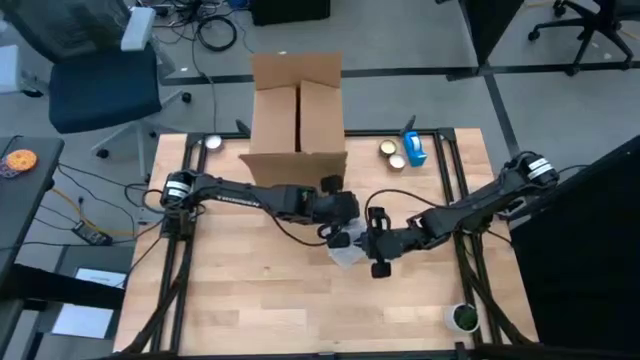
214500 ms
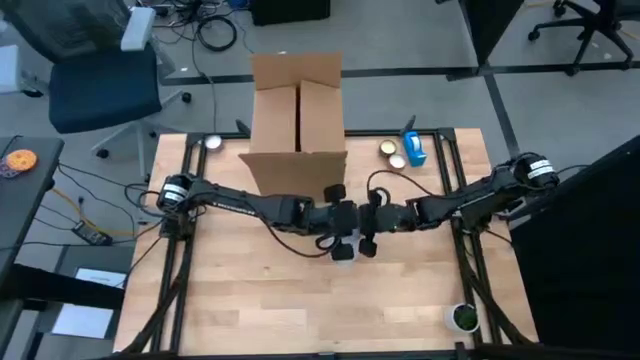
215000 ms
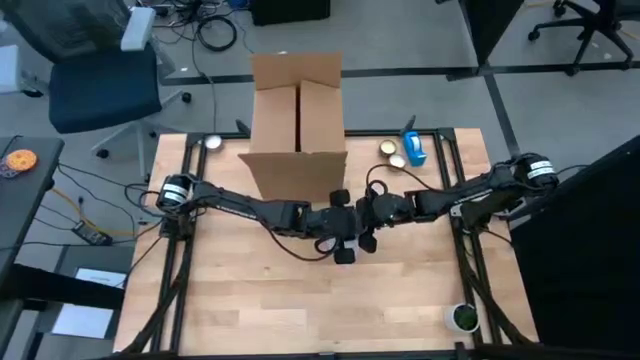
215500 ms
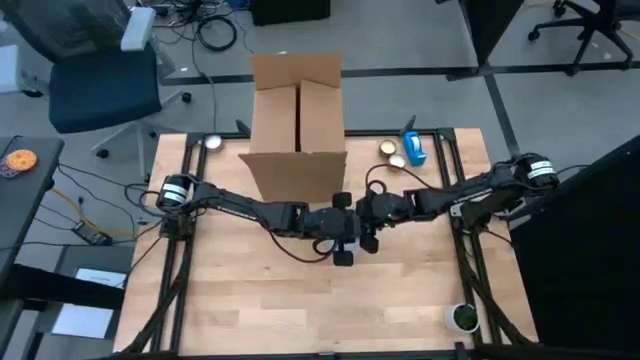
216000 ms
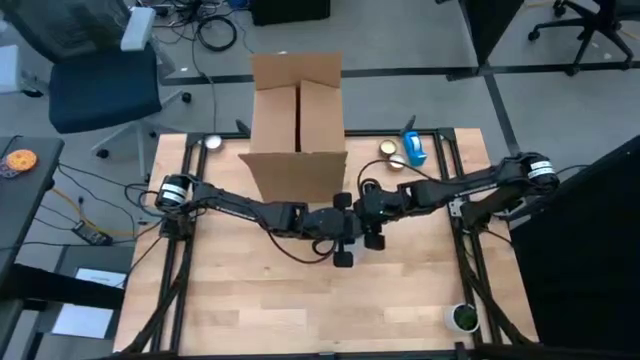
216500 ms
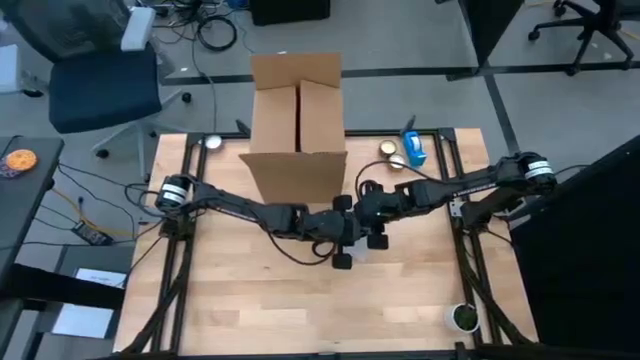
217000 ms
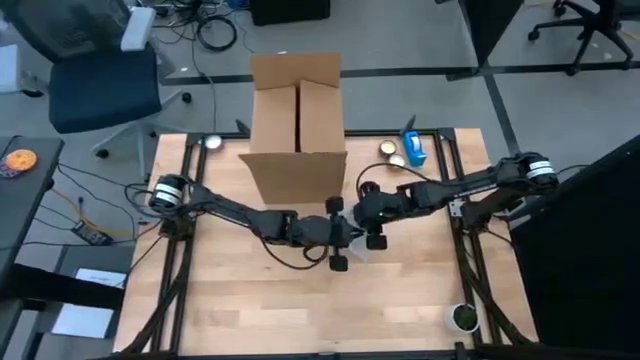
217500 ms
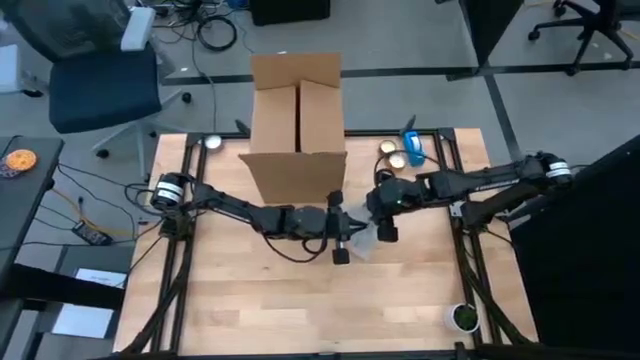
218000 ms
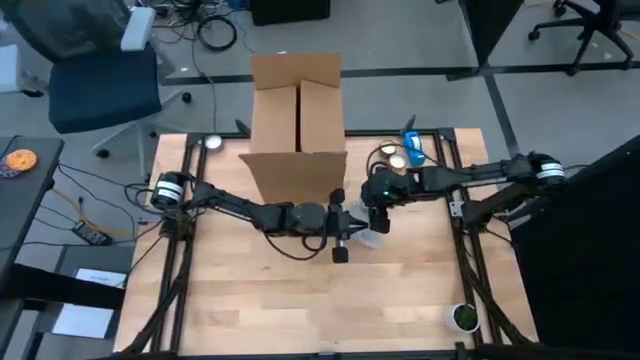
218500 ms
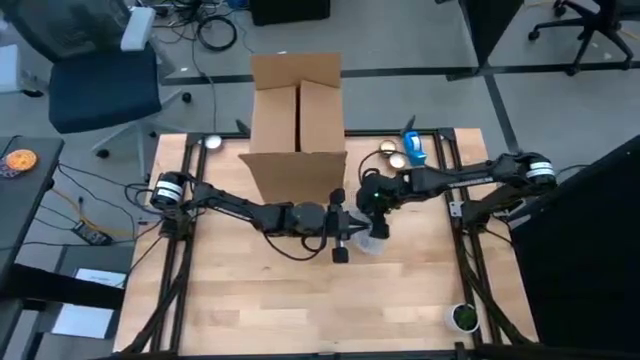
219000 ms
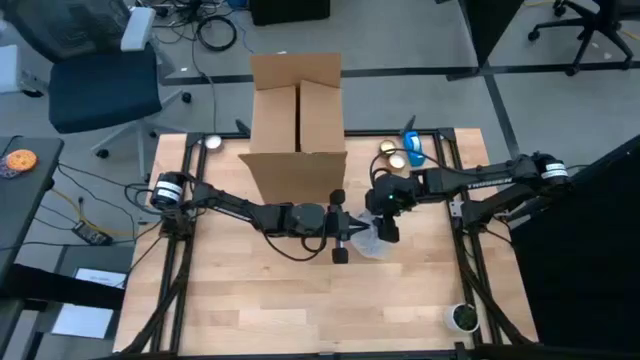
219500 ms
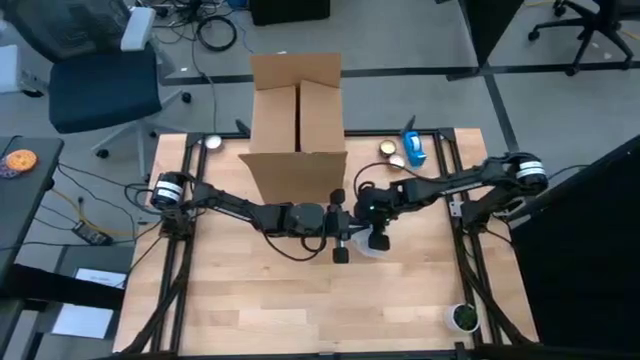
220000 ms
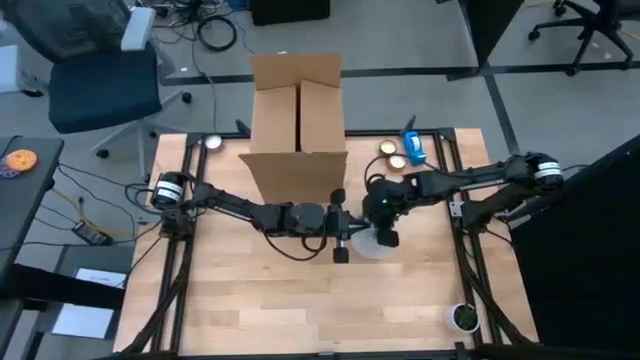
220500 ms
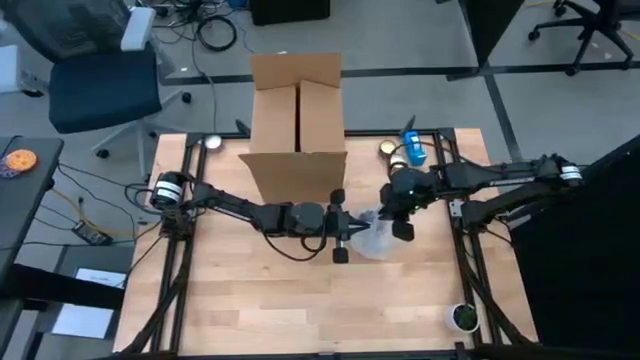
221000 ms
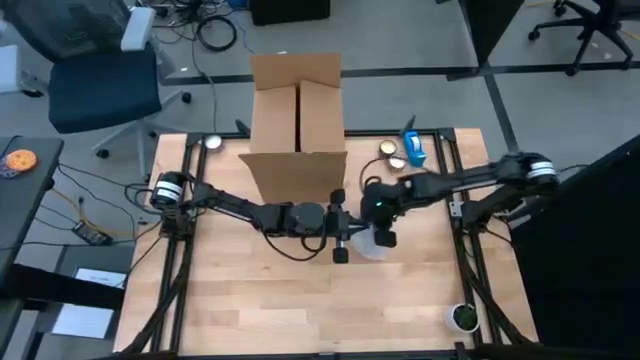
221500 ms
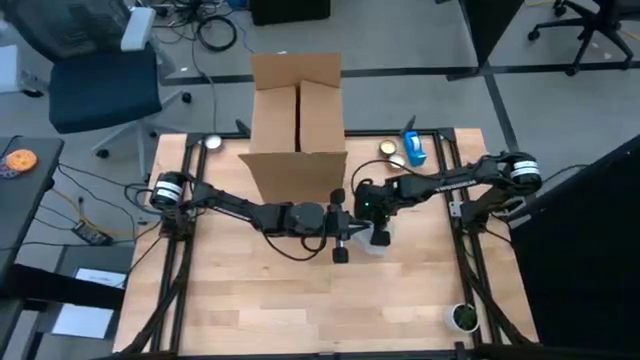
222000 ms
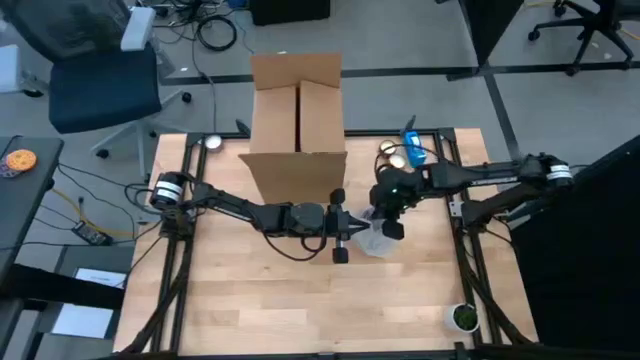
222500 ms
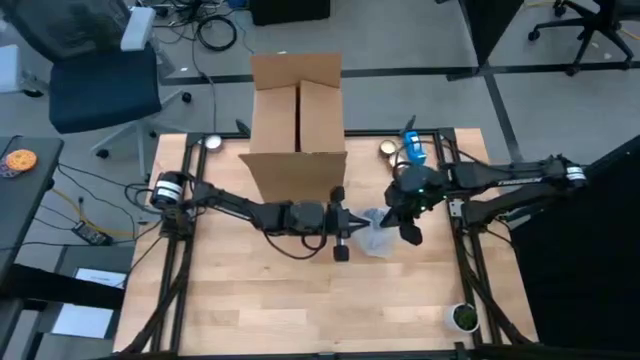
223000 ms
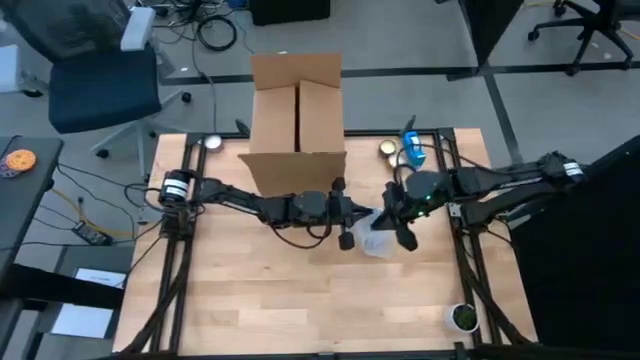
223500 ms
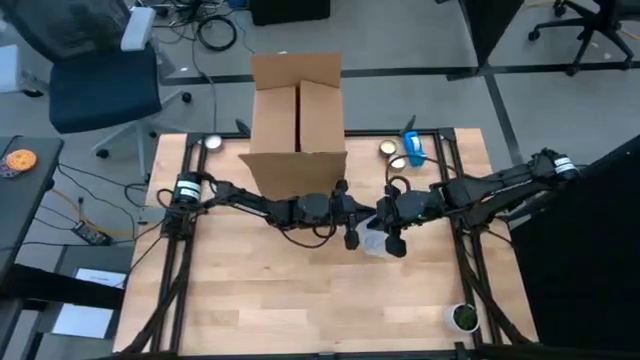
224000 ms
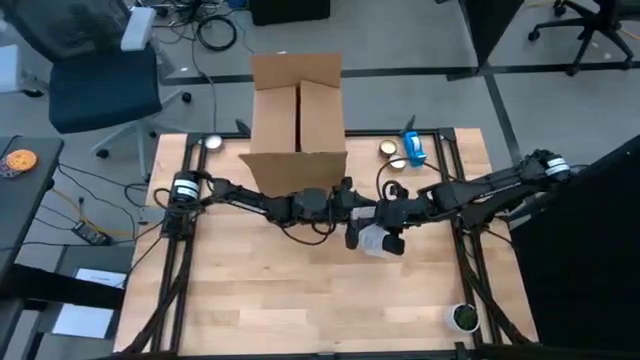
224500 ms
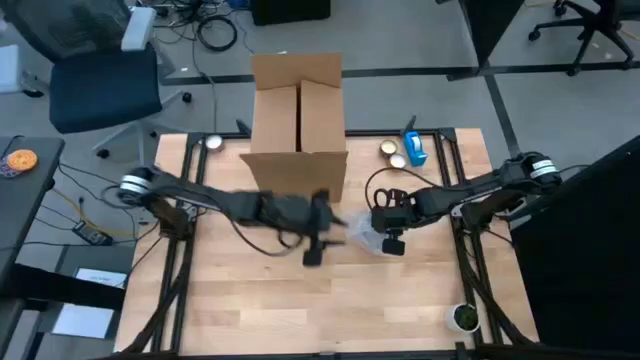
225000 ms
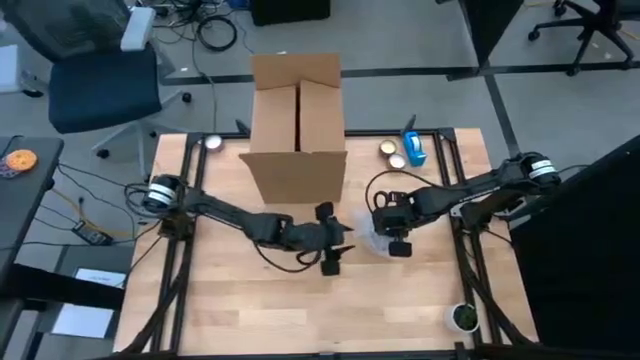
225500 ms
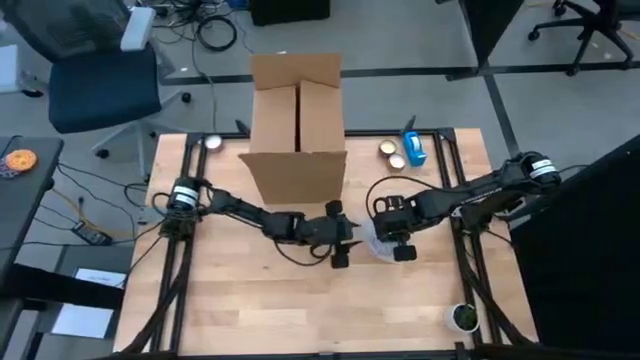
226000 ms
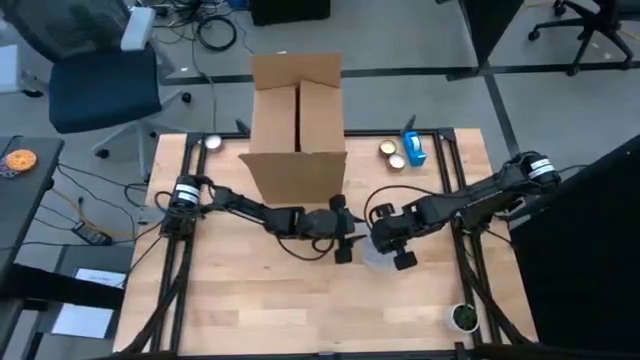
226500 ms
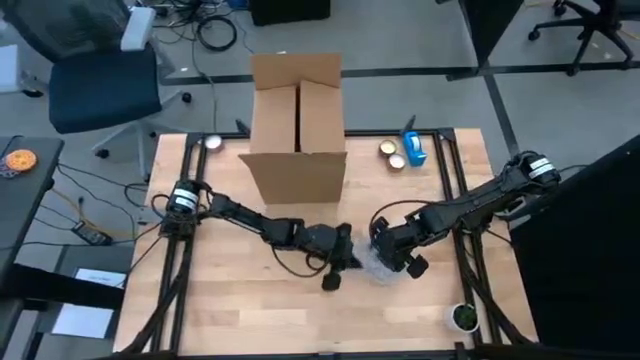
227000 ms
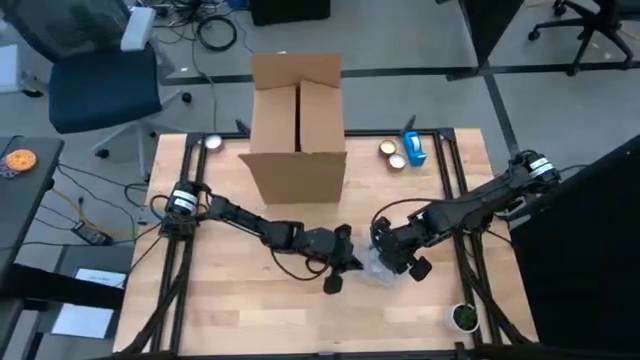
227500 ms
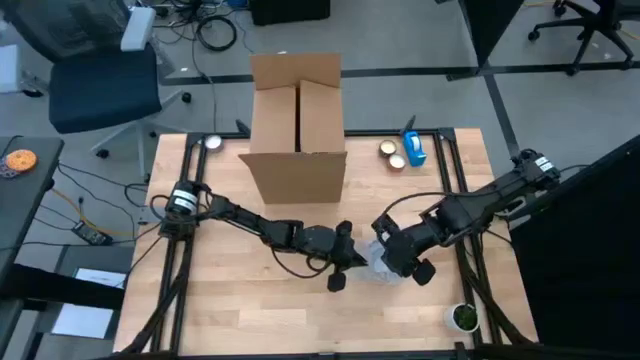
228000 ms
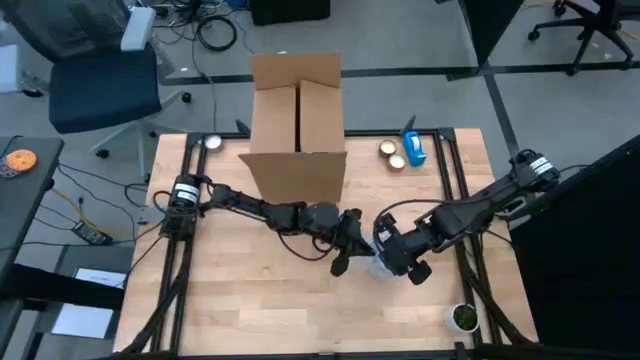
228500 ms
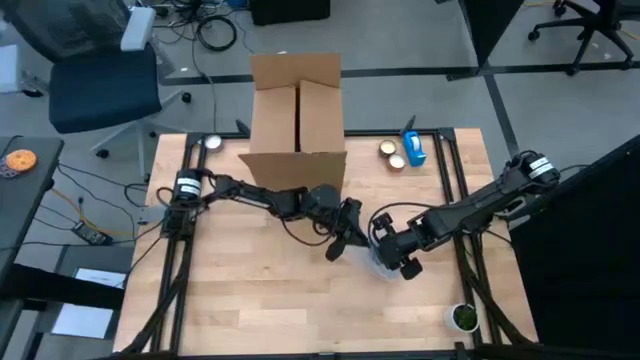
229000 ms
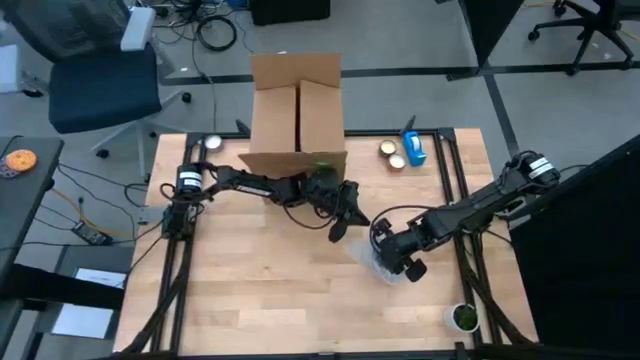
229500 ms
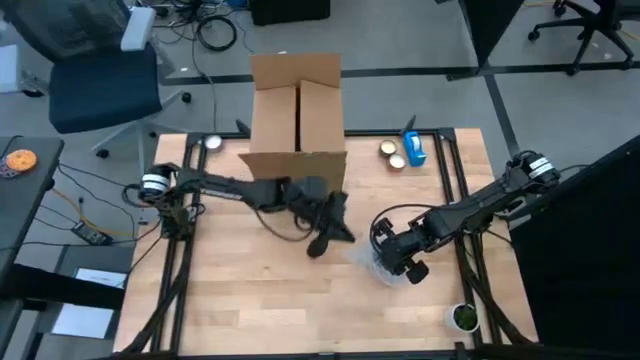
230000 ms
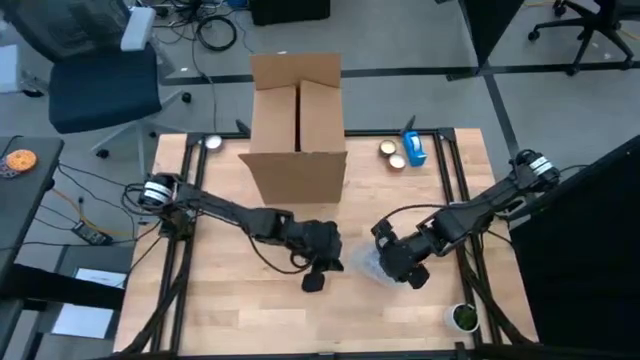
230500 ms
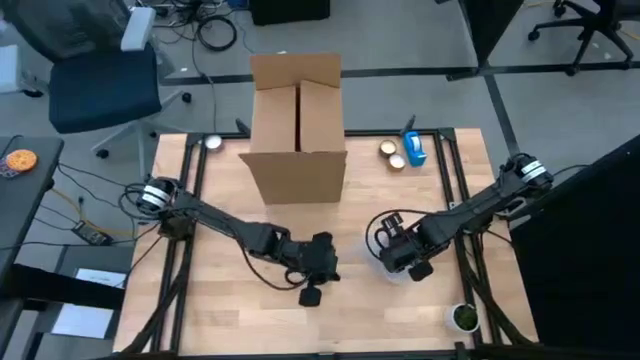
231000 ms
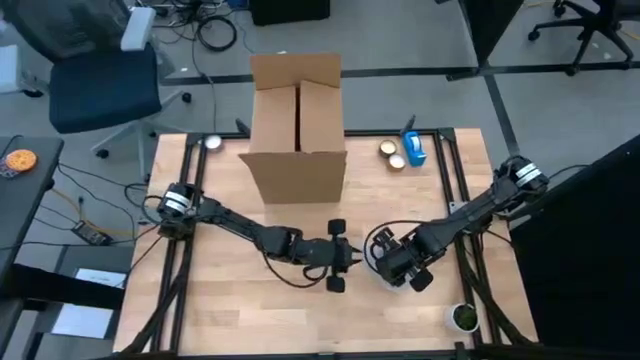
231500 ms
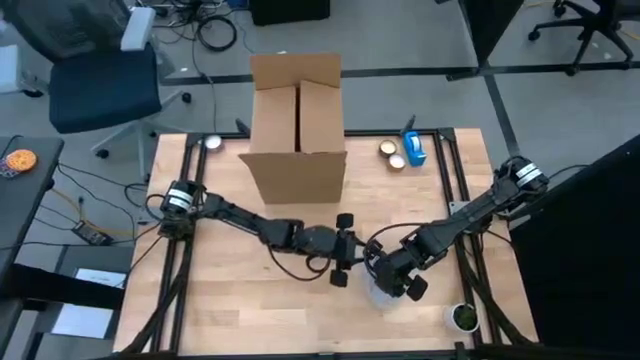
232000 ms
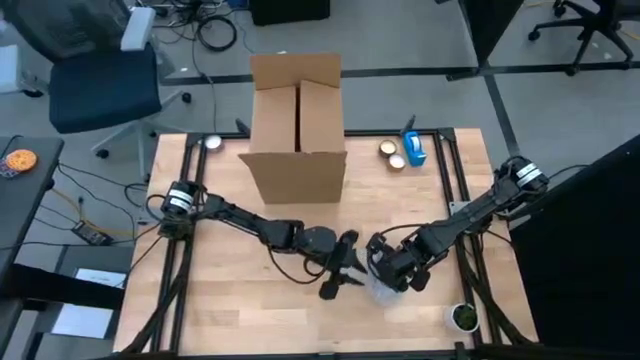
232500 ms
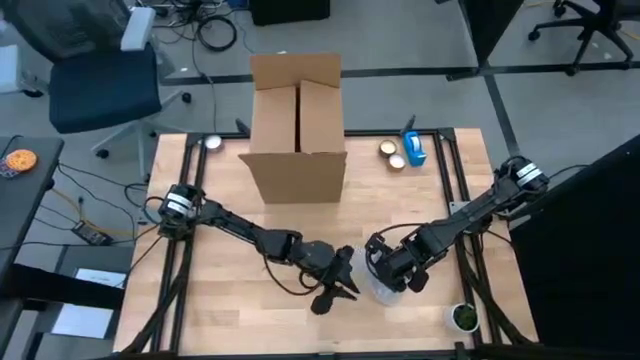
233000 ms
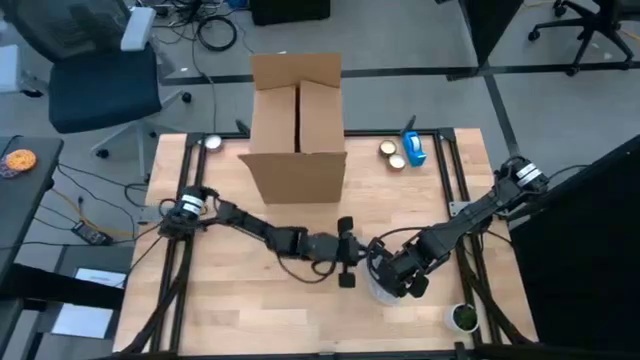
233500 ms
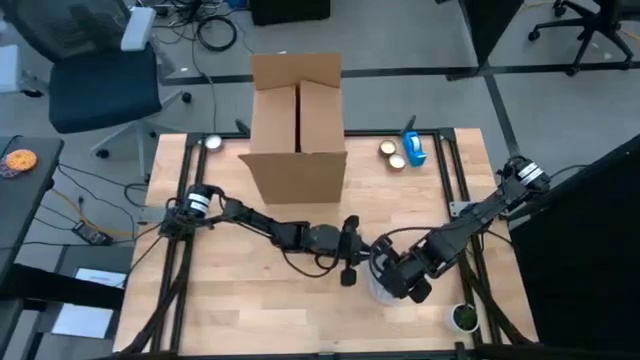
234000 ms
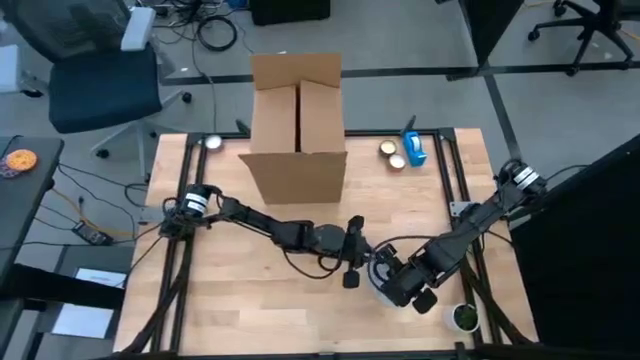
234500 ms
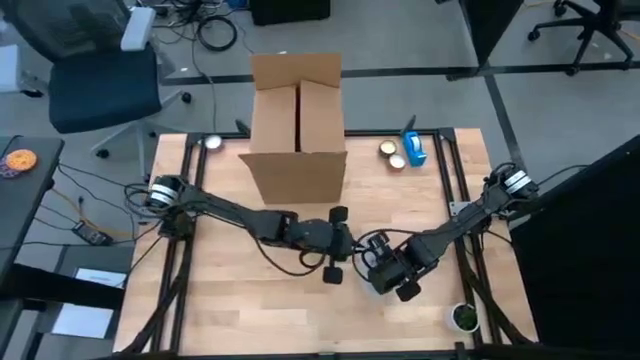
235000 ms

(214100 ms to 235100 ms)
Task: wrap mug
Wrap the blue mug with bubble wrap

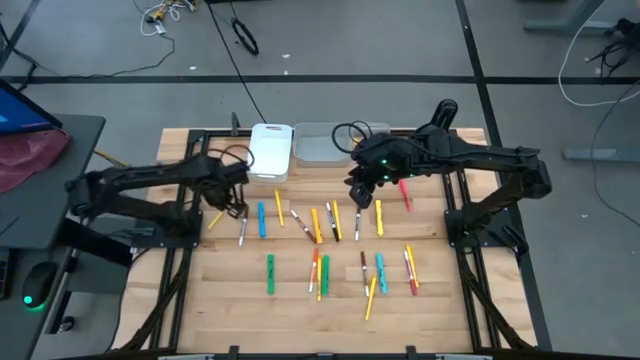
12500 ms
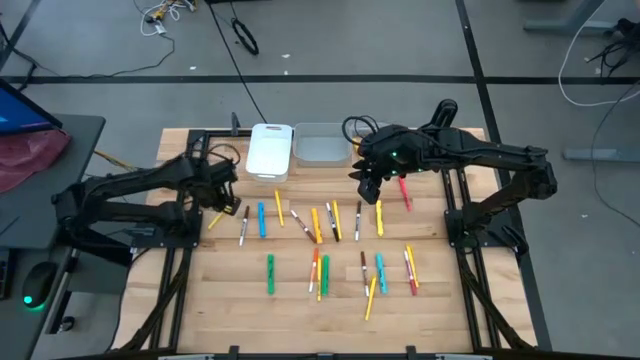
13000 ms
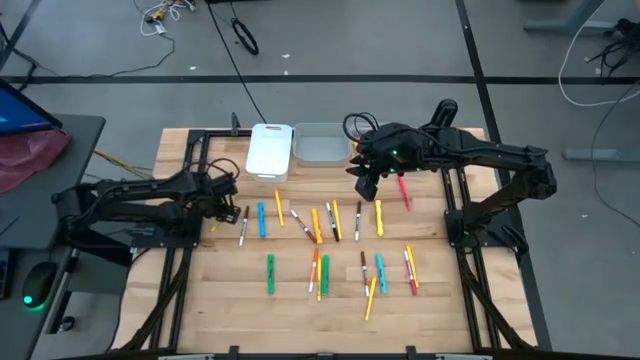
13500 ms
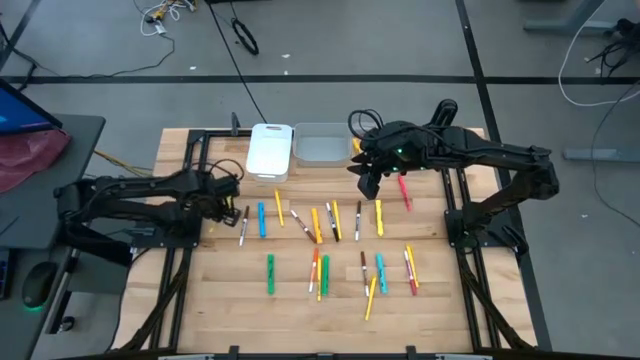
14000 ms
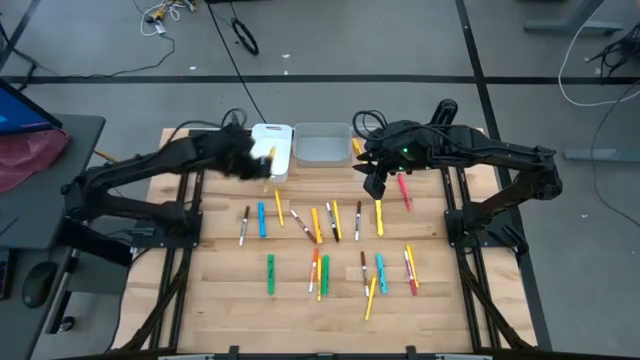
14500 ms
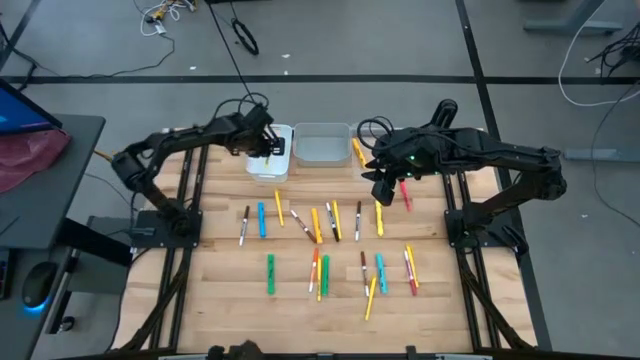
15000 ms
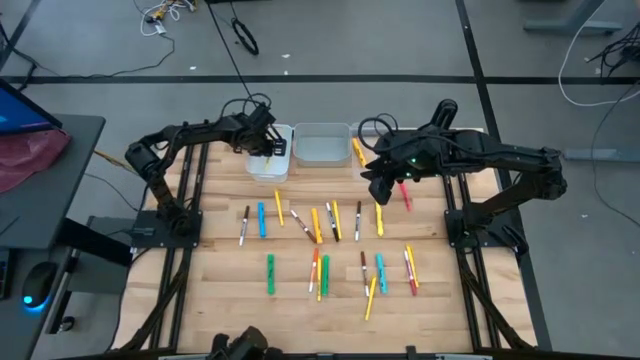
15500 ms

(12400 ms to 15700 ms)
Task: Pick & Place Markers
Put the yellow pen into the white bin
